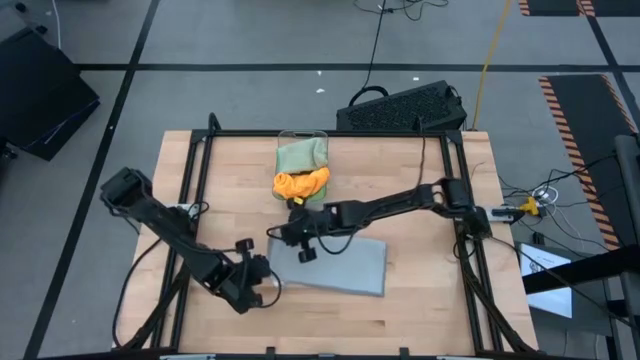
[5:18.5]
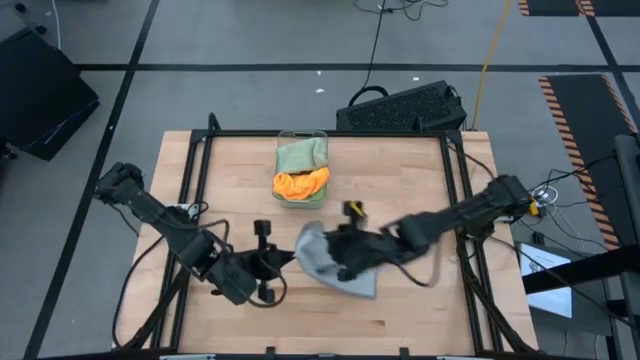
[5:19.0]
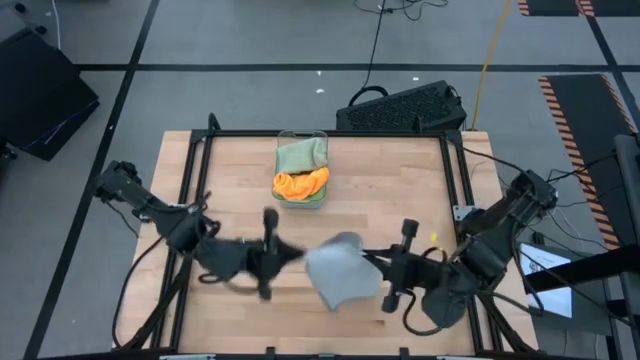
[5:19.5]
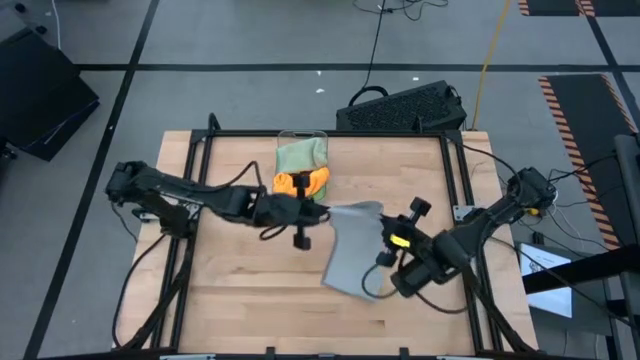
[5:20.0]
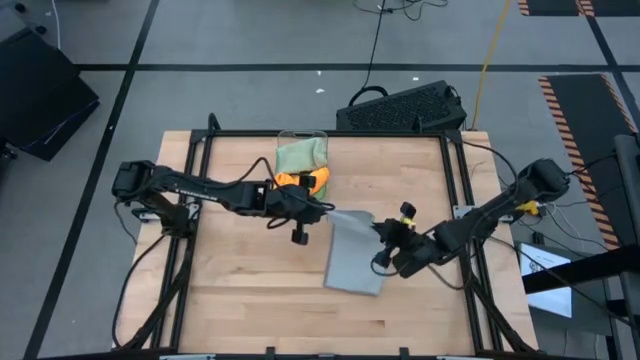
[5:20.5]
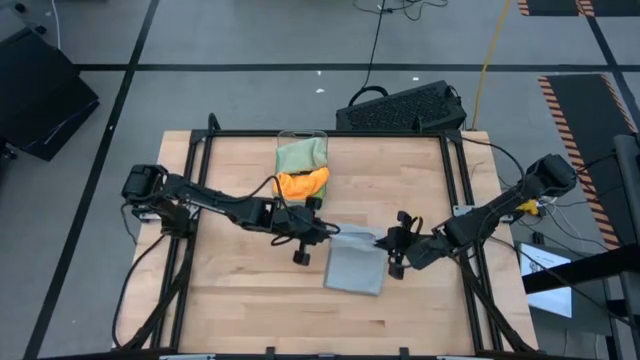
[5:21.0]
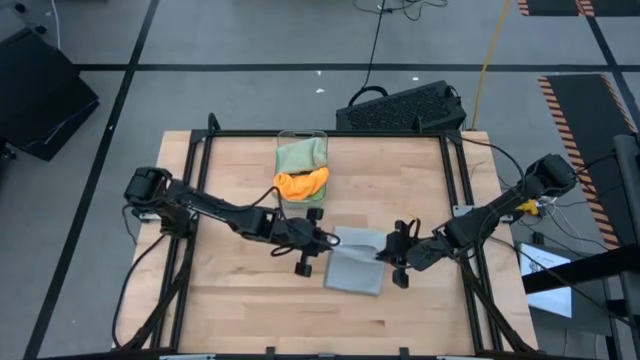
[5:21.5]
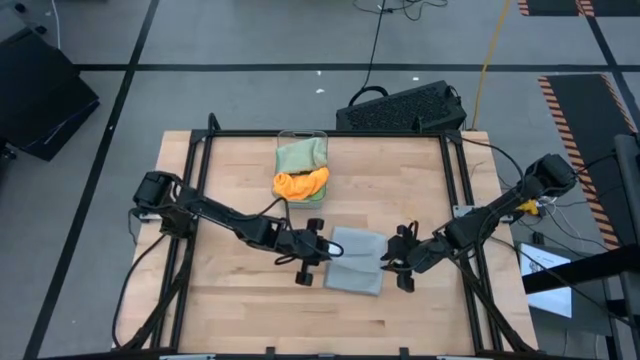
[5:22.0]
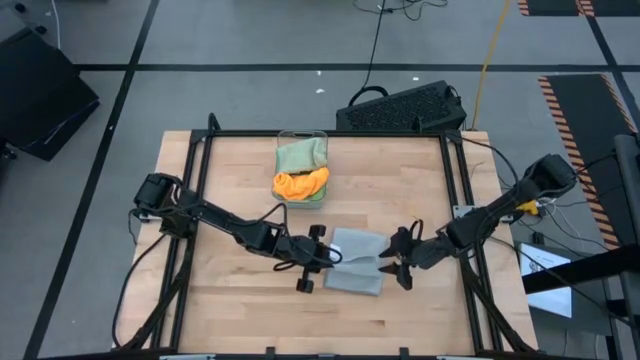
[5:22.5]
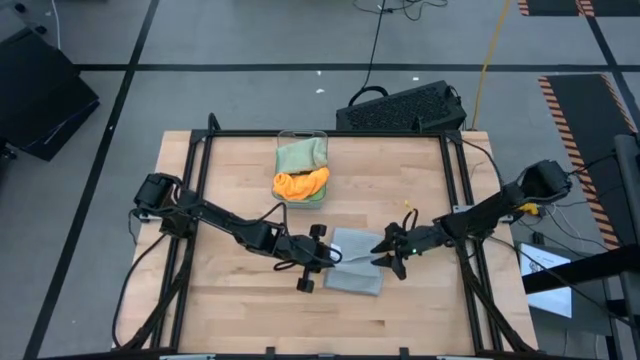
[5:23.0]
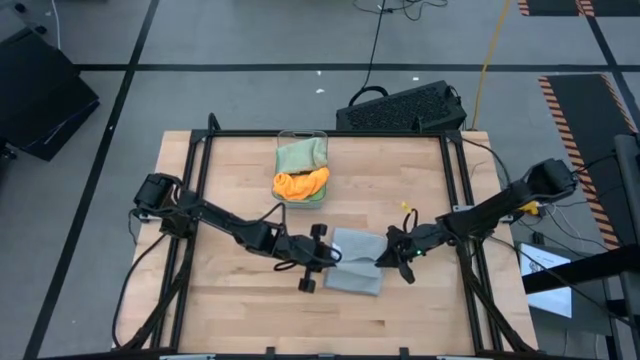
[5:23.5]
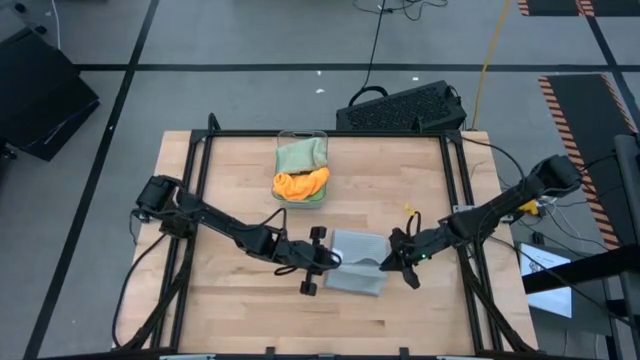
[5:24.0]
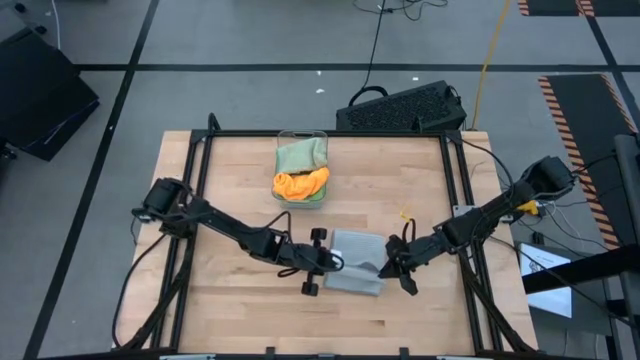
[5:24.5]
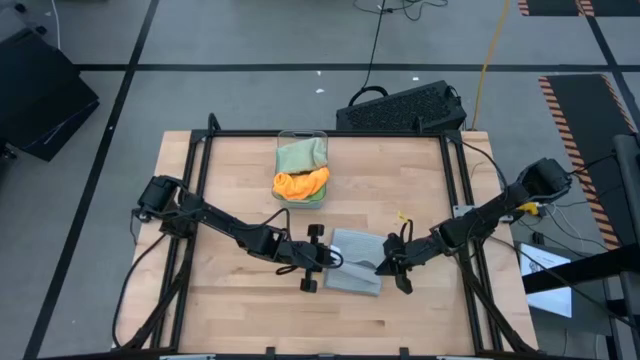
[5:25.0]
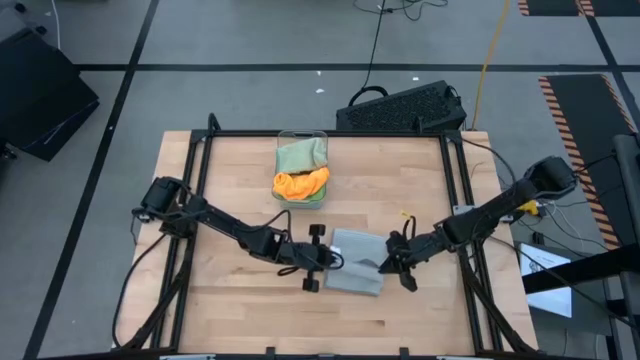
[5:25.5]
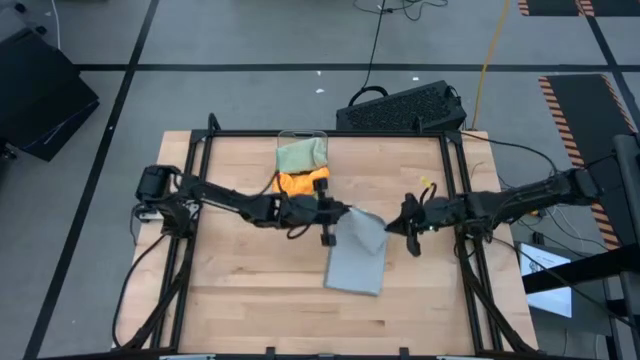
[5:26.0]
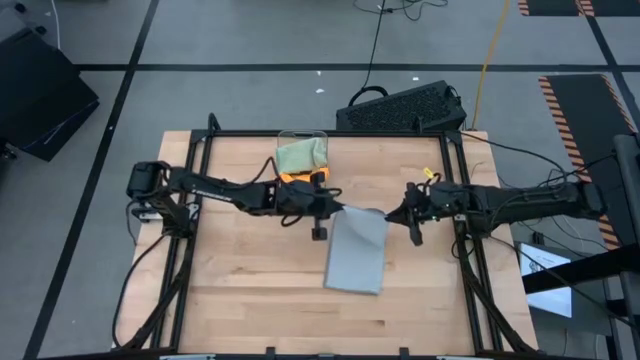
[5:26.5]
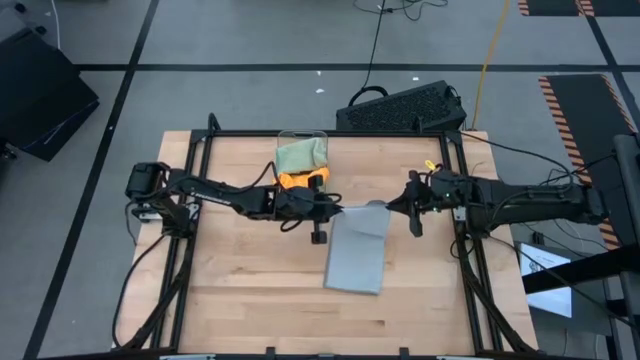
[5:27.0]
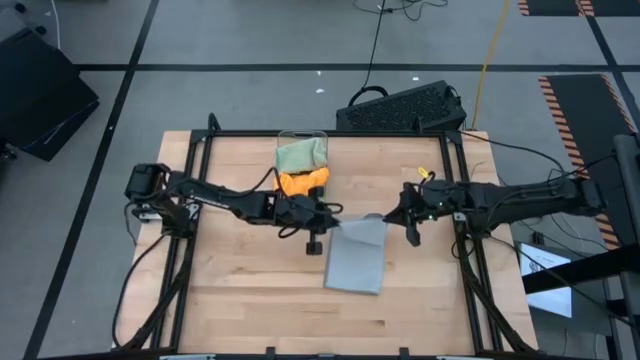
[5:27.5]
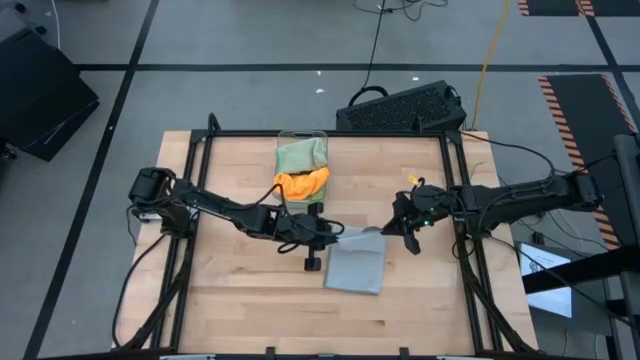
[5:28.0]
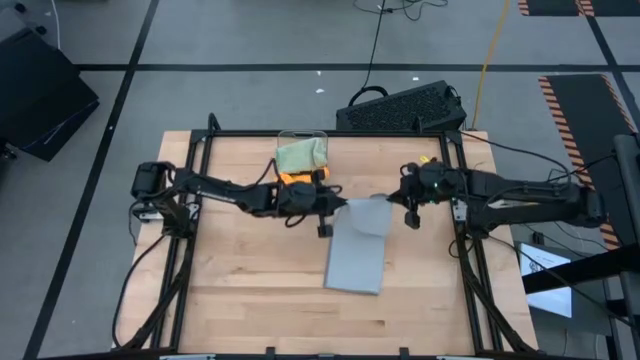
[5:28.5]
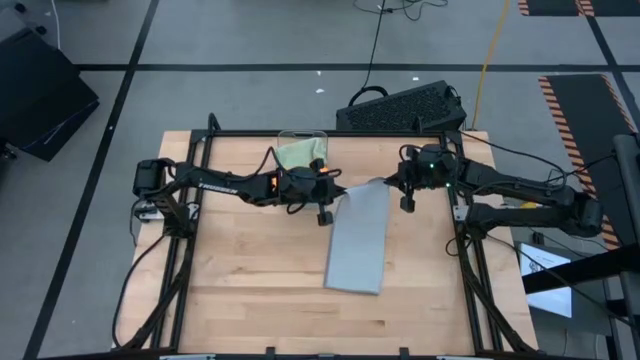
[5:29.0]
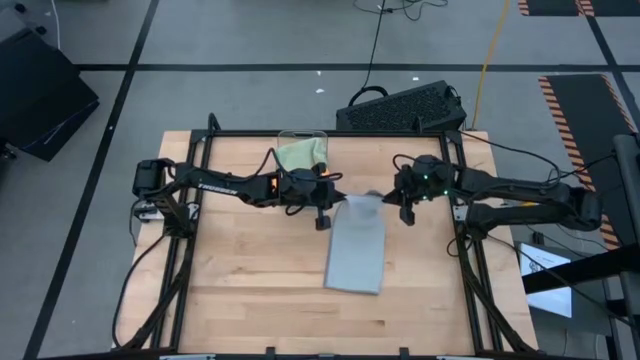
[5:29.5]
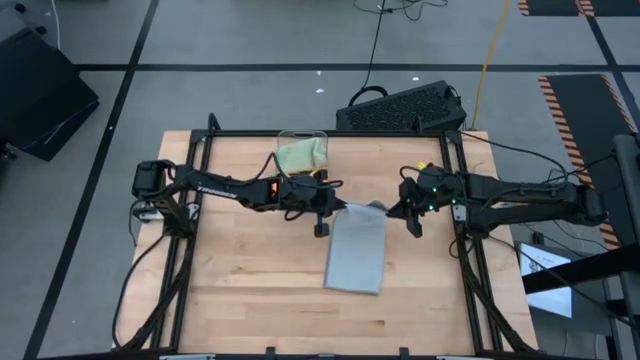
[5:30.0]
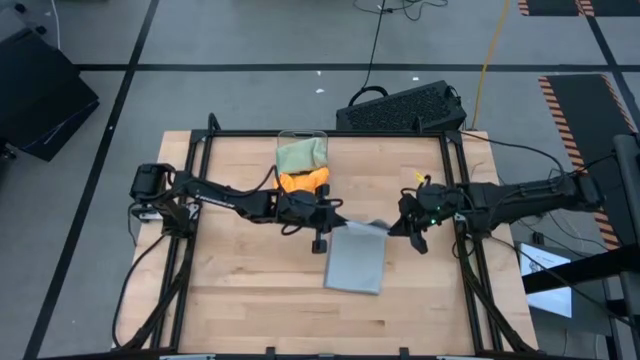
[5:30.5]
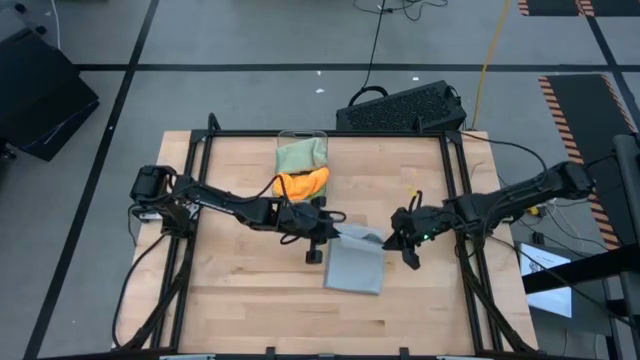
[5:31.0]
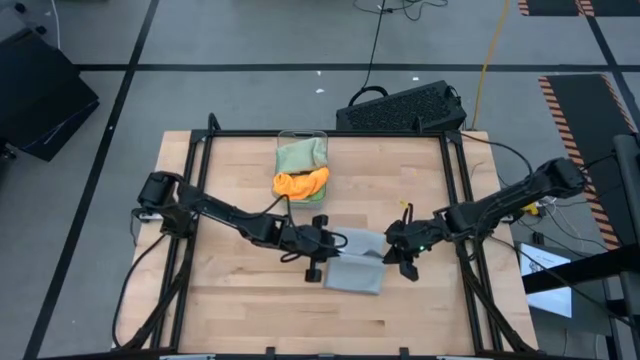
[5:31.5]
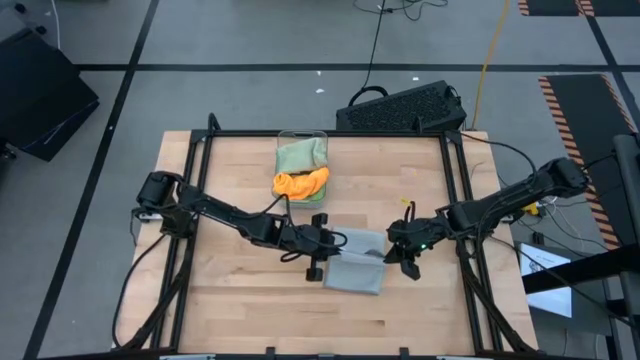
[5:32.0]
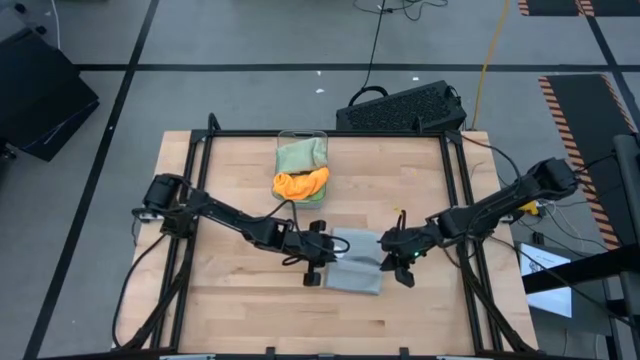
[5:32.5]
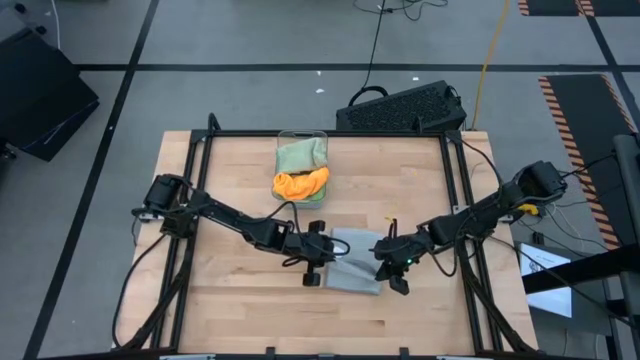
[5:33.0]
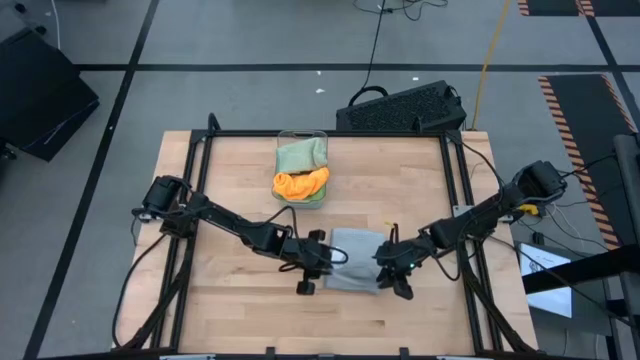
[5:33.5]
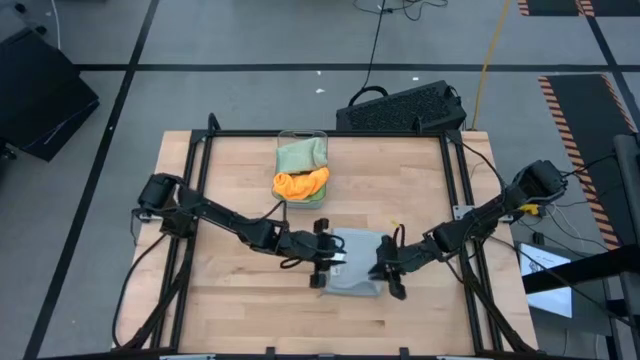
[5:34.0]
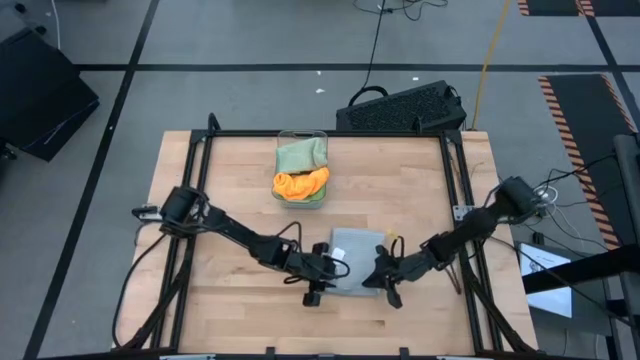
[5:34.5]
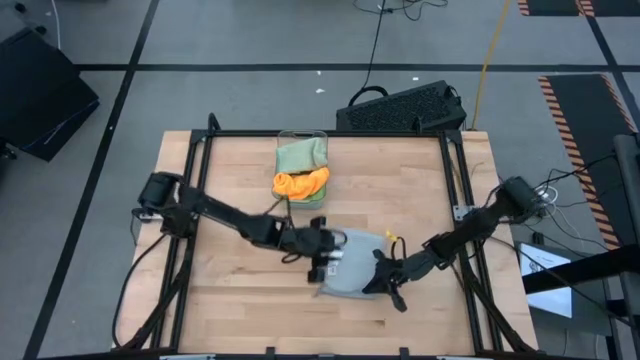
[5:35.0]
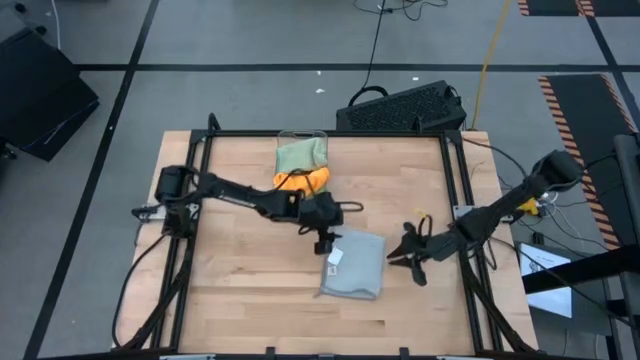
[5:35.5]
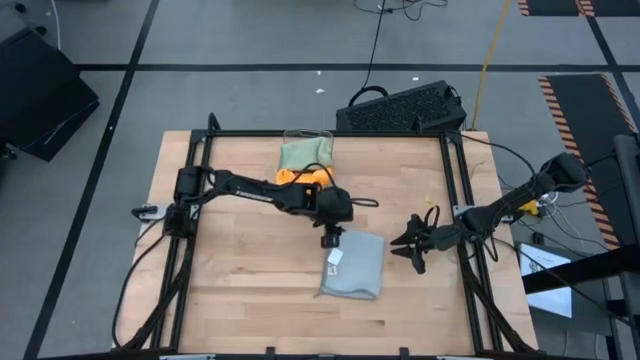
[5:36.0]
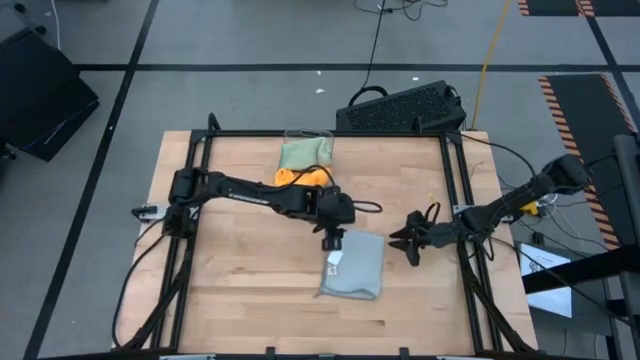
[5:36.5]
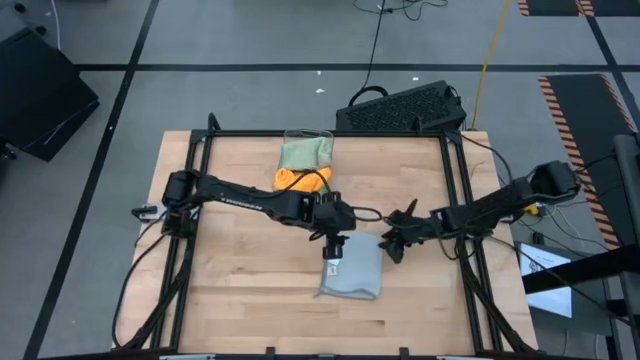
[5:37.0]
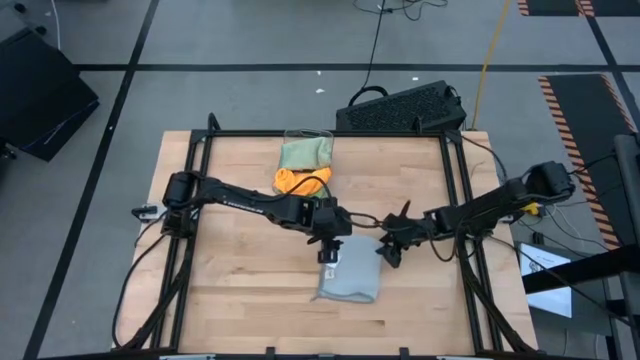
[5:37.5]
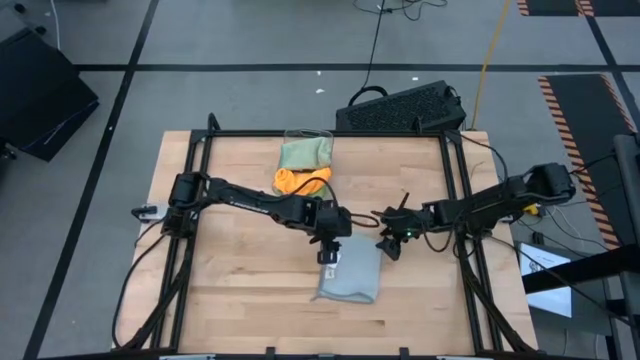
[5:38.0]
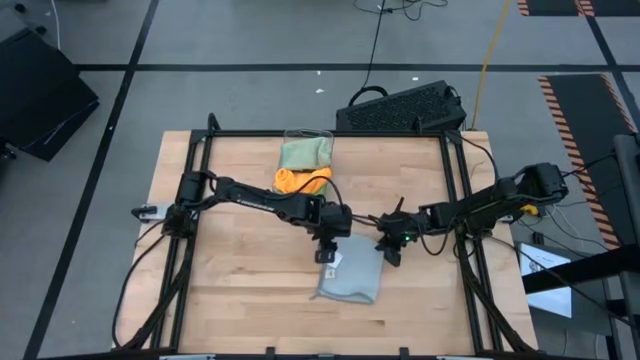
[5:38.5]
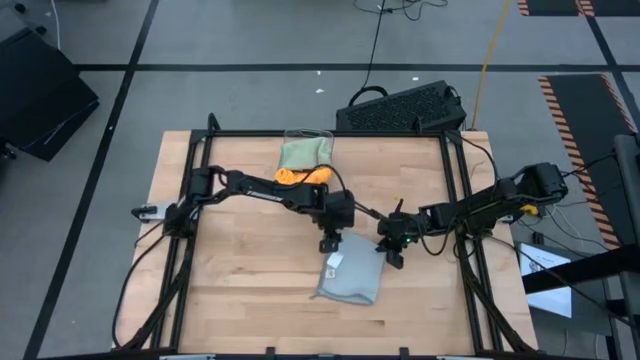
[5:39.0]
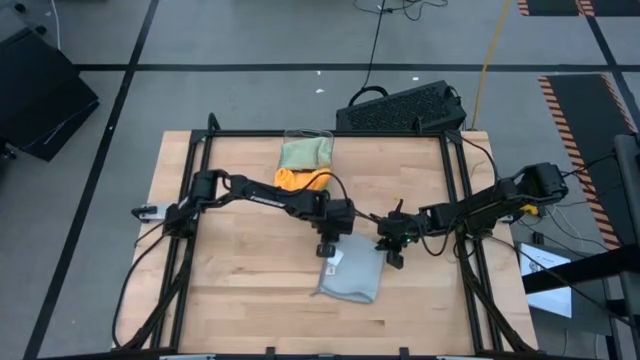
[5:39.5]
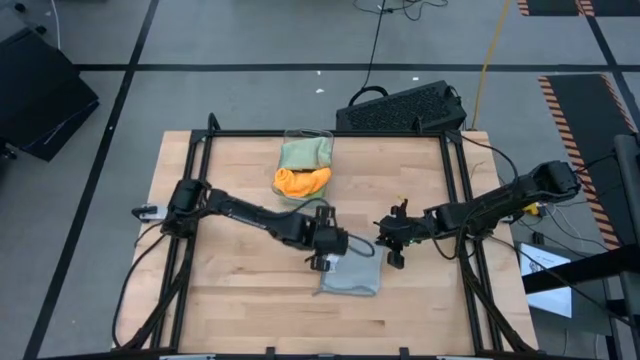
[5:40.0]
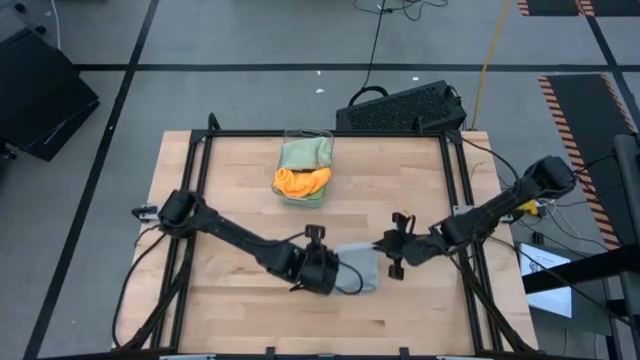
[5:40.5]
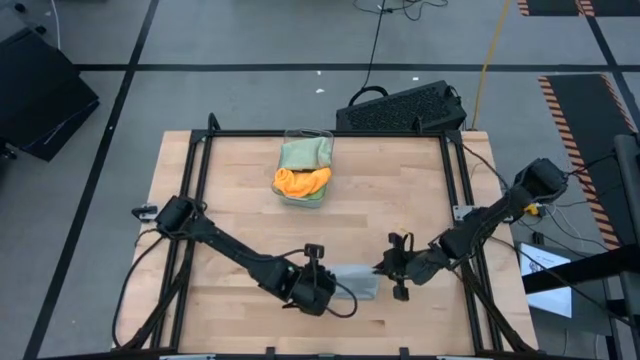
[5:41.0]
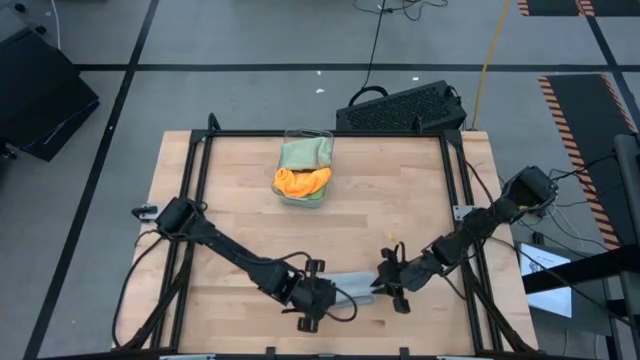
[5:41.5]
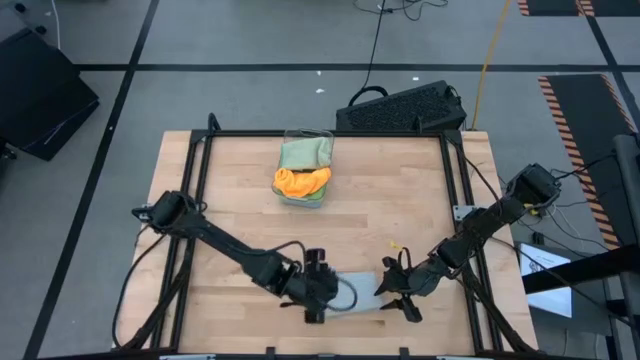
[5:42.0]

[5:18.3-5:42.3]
Task: Fold microfiber towels
Fold the gray towel
